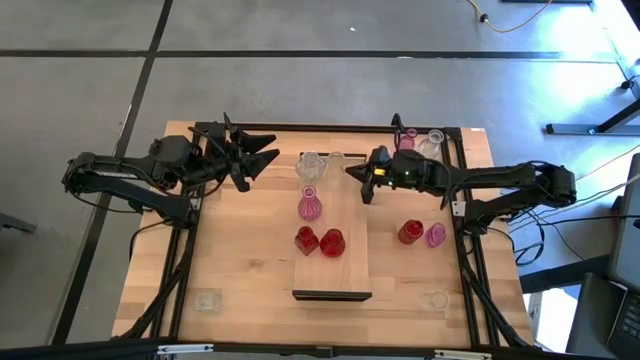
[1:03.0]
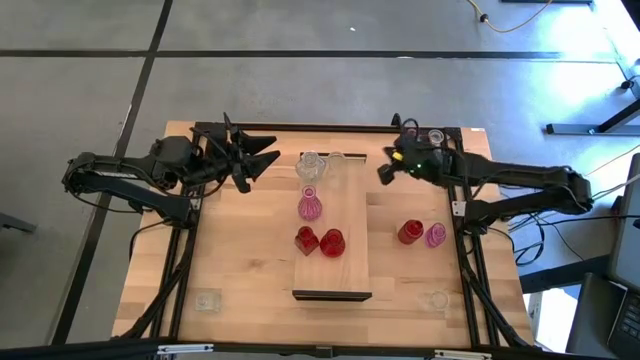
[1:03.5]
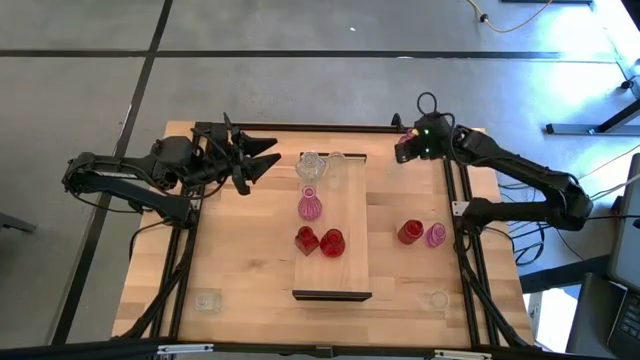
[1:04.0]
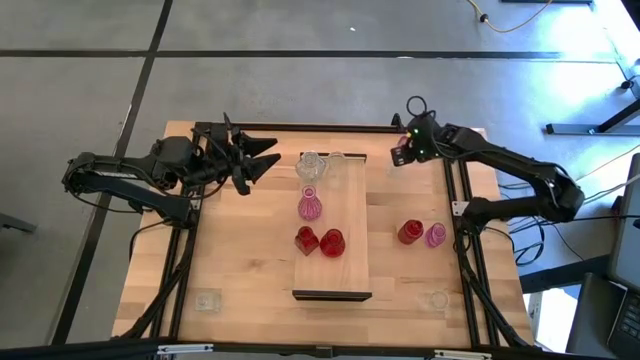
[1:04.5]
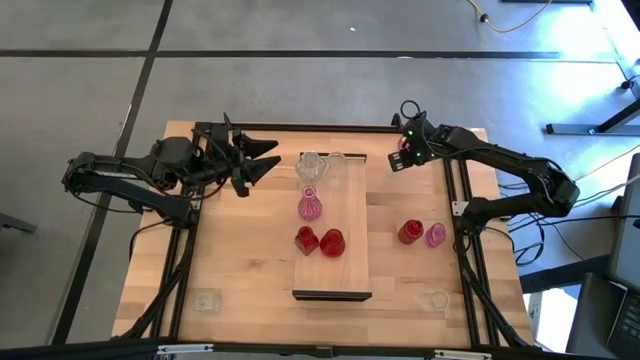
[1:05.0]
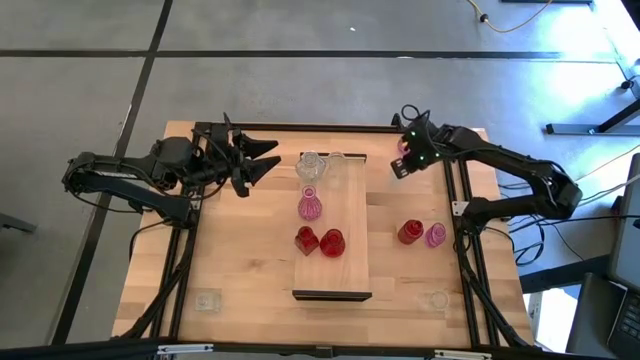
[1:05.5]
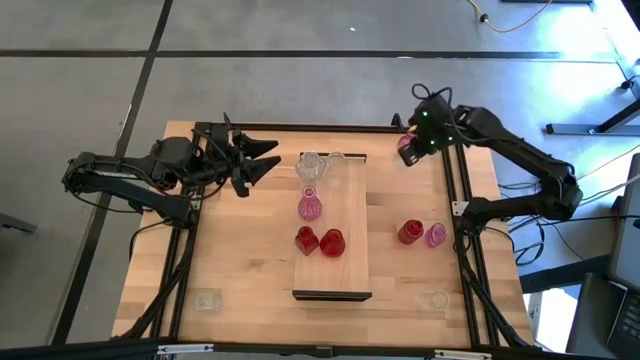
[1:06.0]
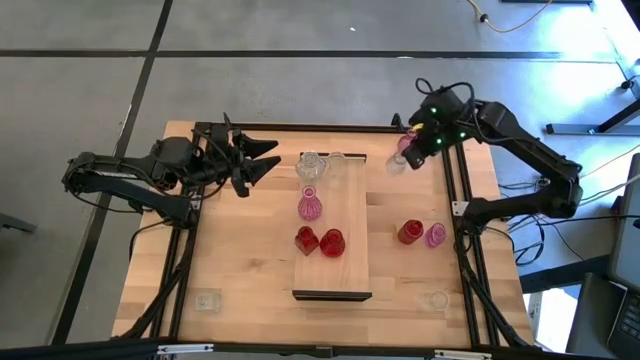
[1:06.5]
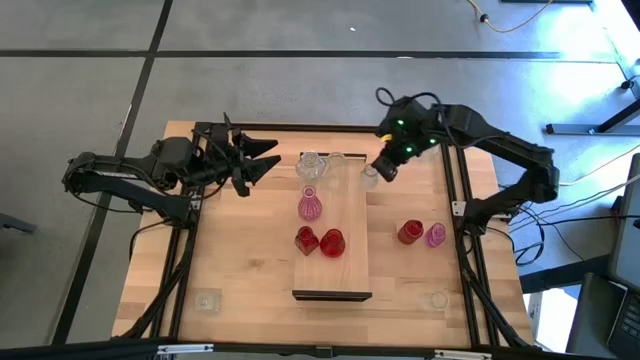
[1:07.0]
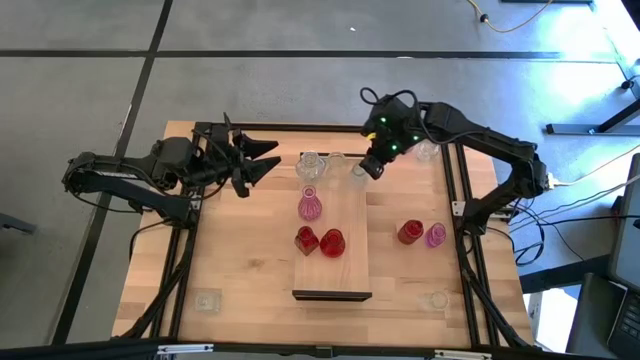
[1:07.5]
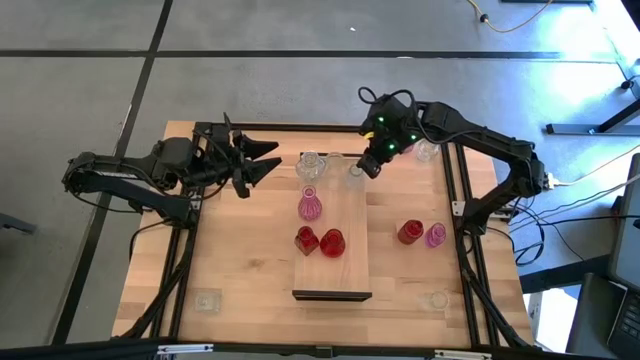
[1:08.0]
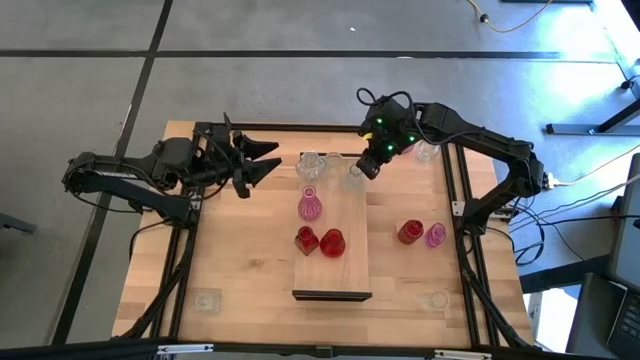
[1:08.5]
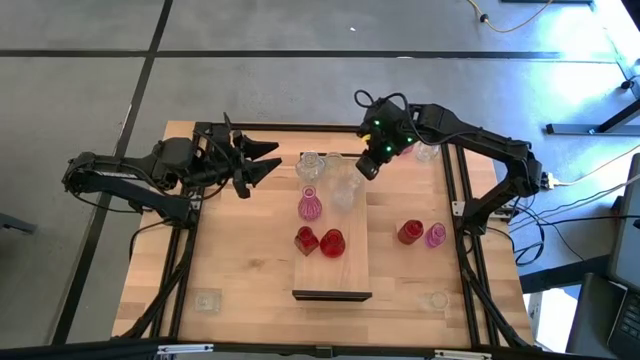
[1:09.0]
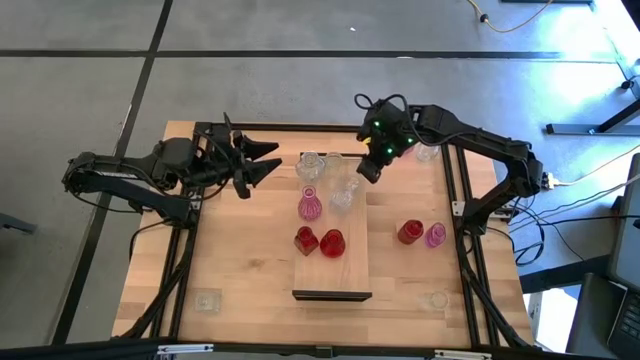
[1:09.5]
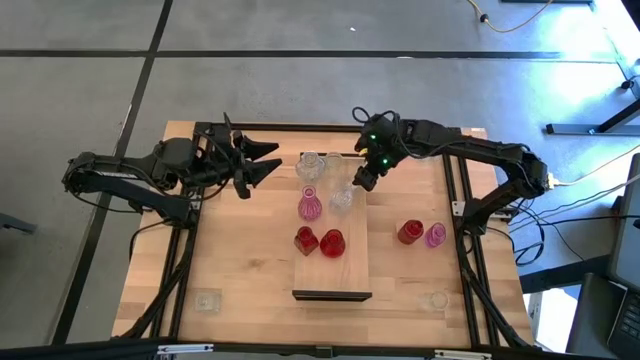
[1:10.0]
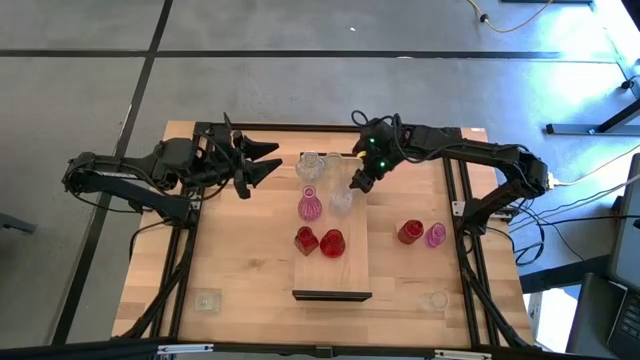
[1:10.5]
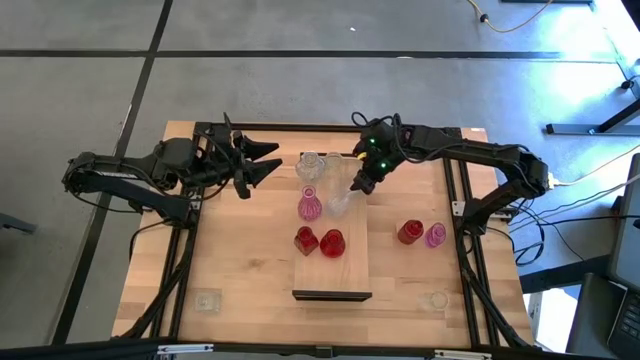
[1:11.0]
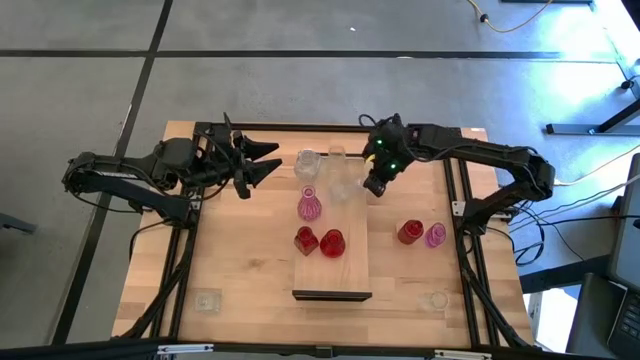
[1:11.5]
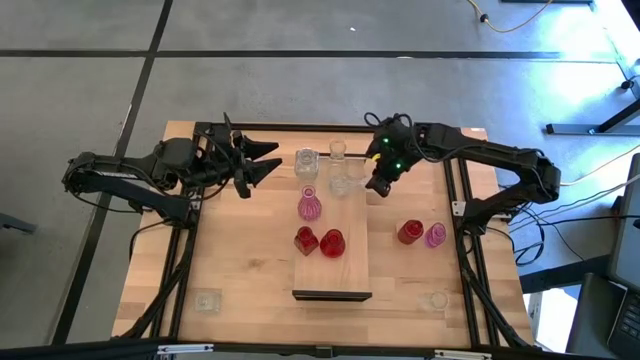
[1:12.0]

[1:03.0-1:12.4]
Task: sort vases onto shelf
Put the transparent vase on the shelf aligned with the other transparent vases

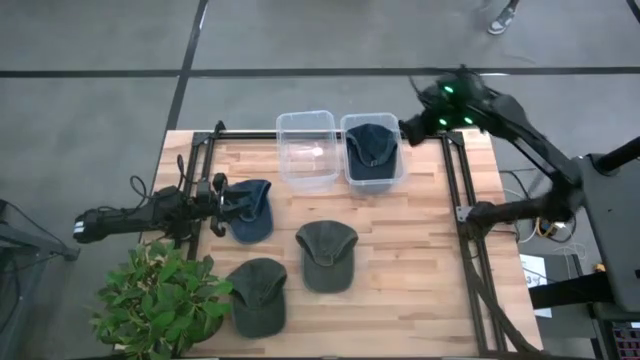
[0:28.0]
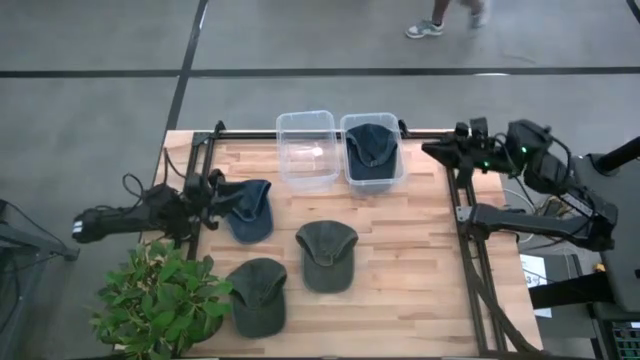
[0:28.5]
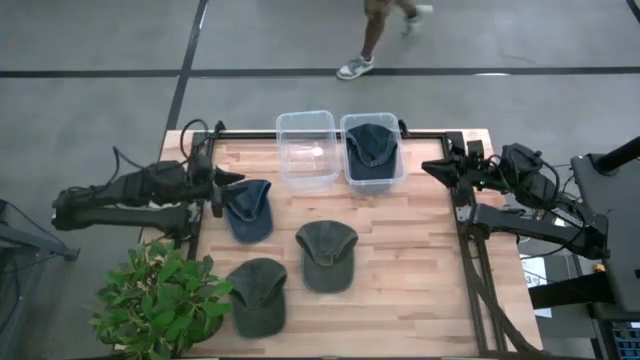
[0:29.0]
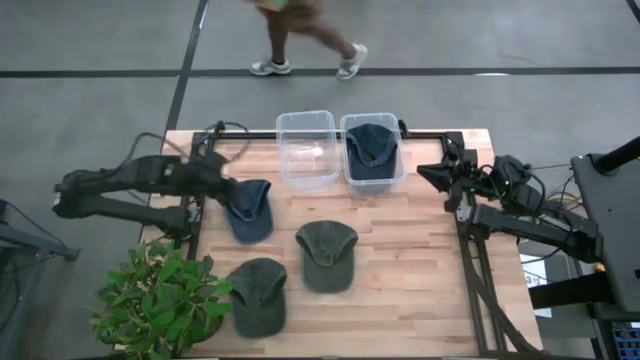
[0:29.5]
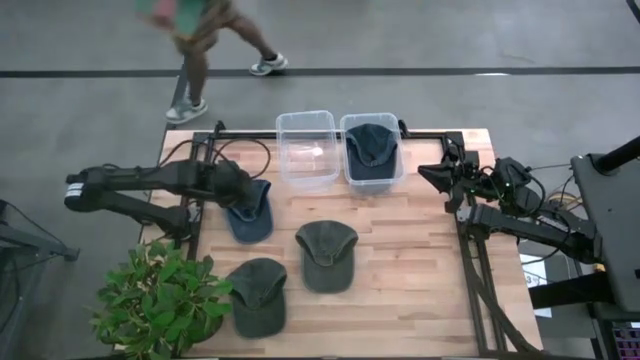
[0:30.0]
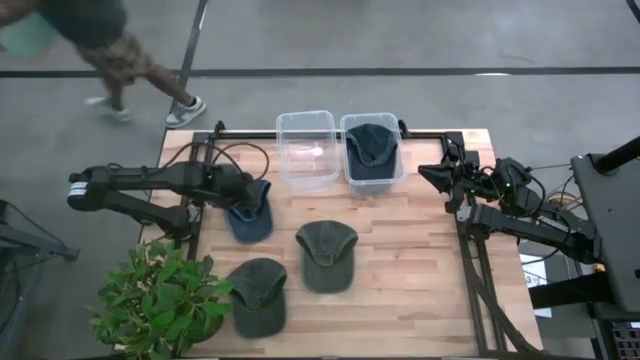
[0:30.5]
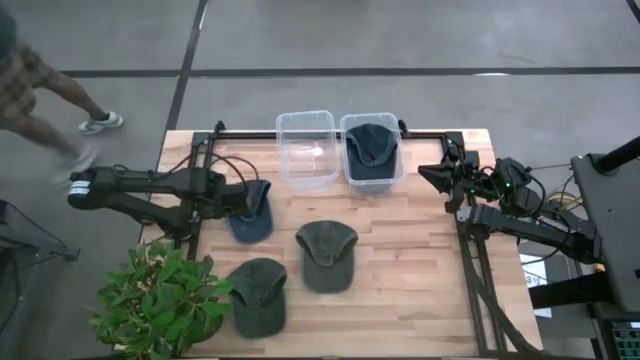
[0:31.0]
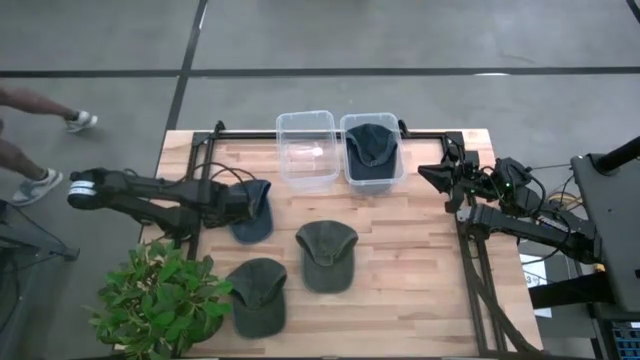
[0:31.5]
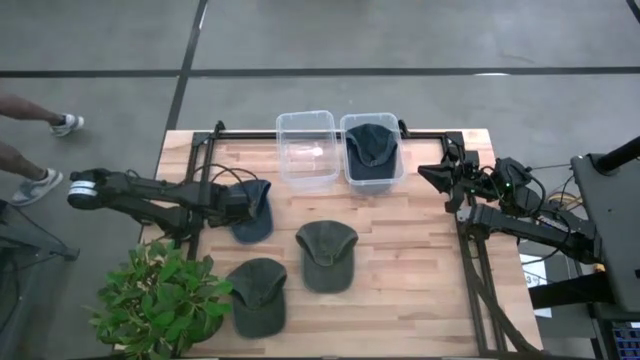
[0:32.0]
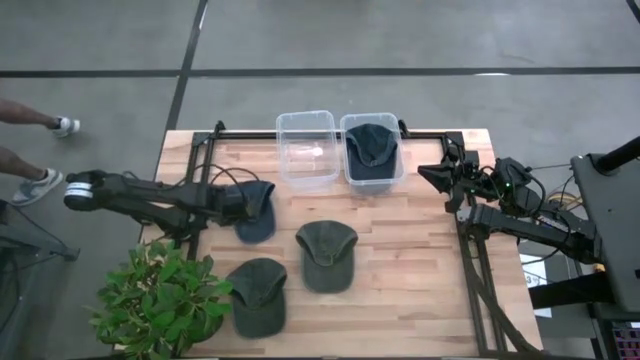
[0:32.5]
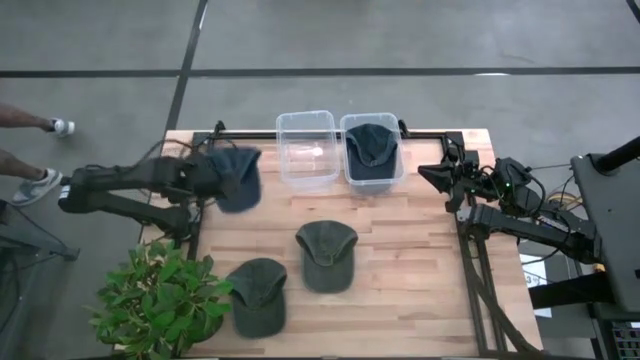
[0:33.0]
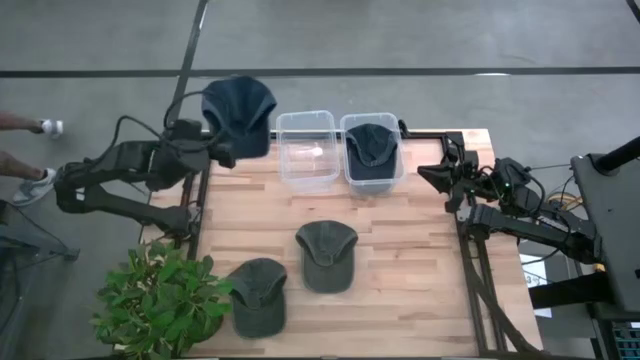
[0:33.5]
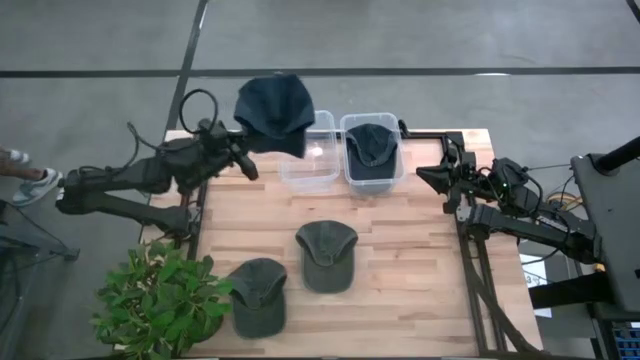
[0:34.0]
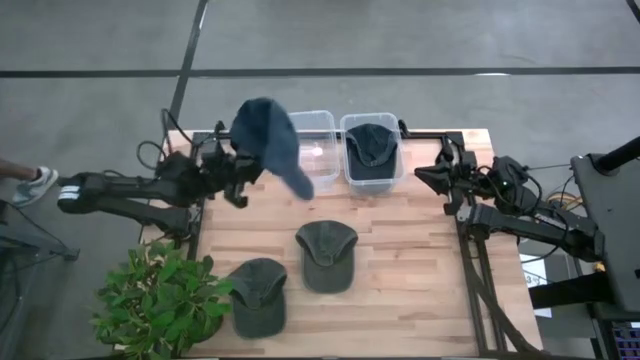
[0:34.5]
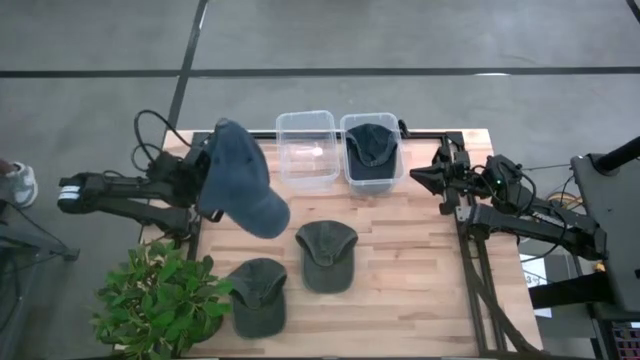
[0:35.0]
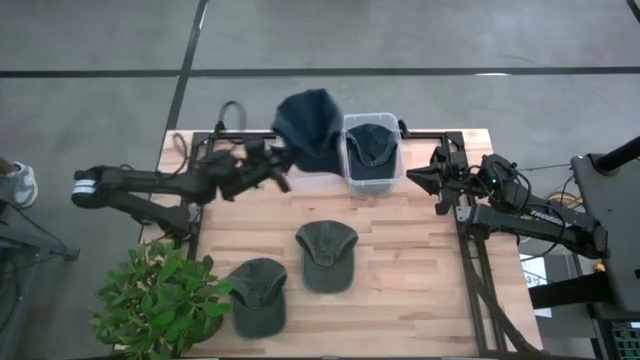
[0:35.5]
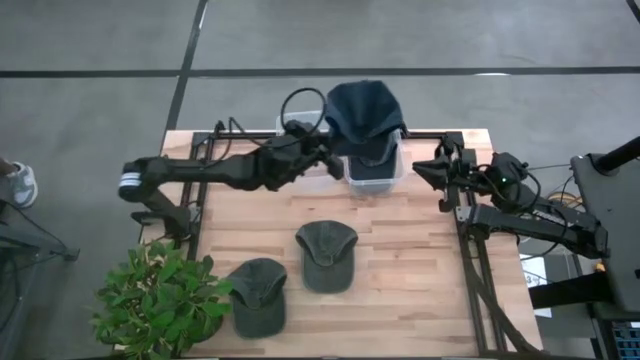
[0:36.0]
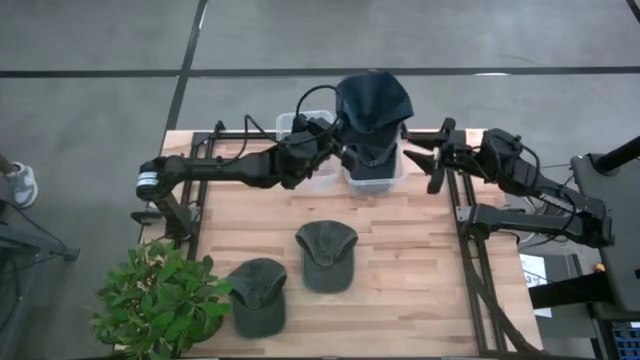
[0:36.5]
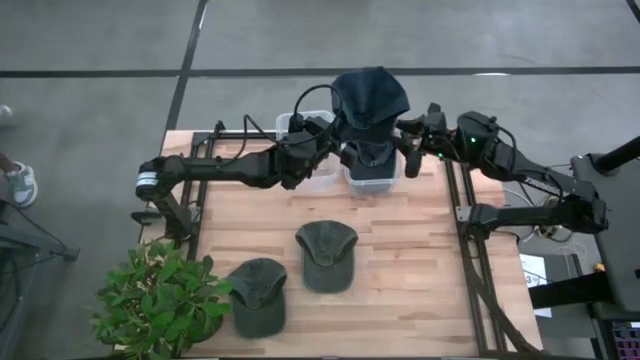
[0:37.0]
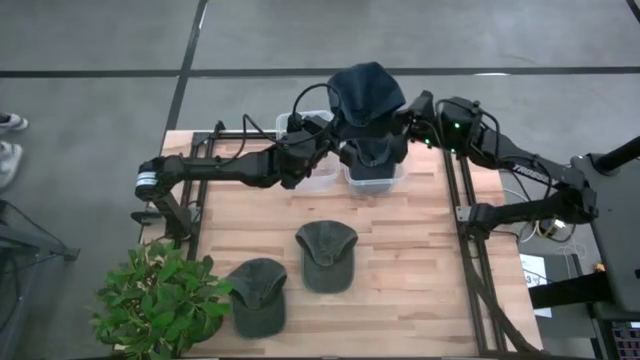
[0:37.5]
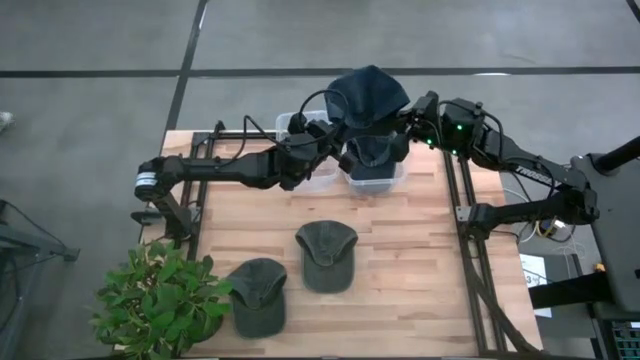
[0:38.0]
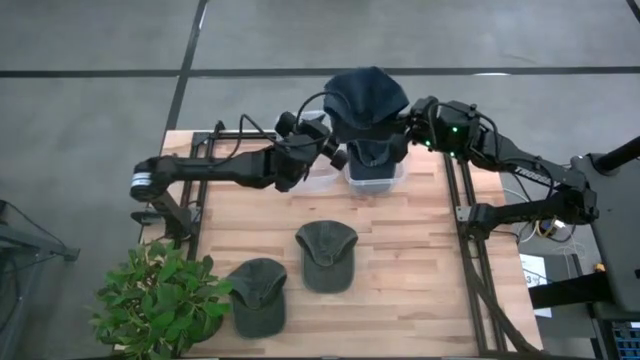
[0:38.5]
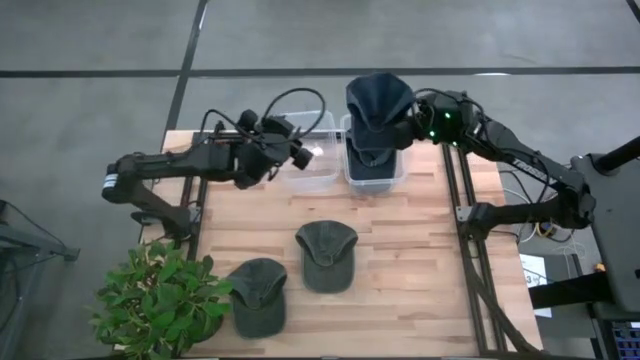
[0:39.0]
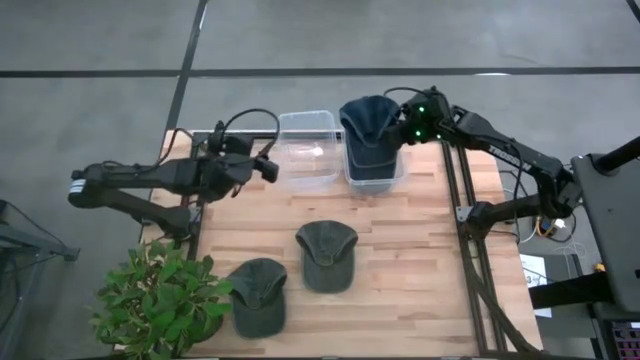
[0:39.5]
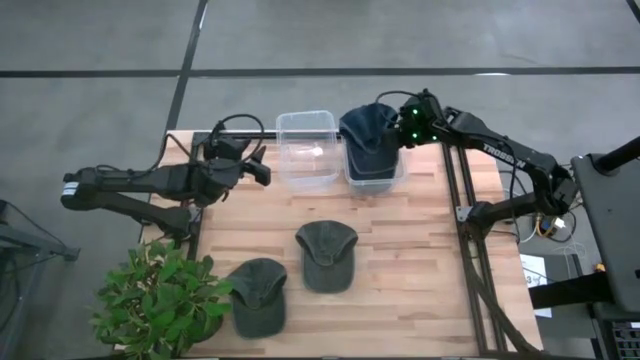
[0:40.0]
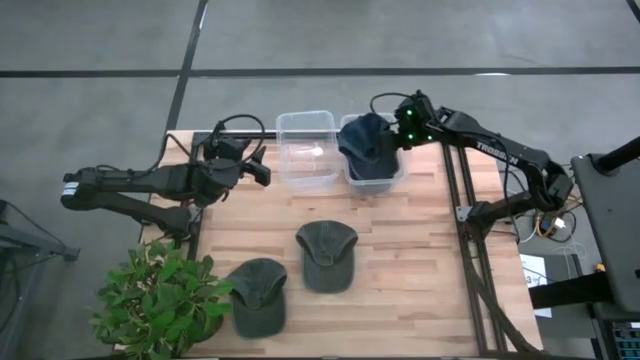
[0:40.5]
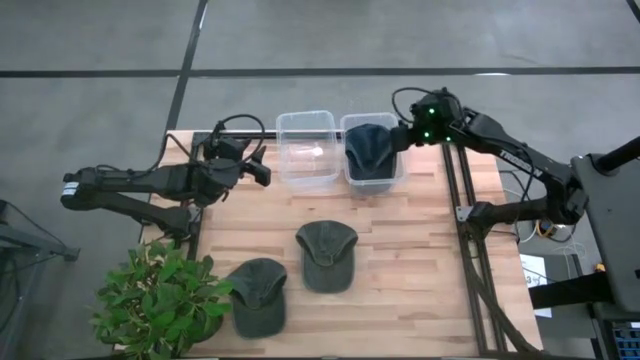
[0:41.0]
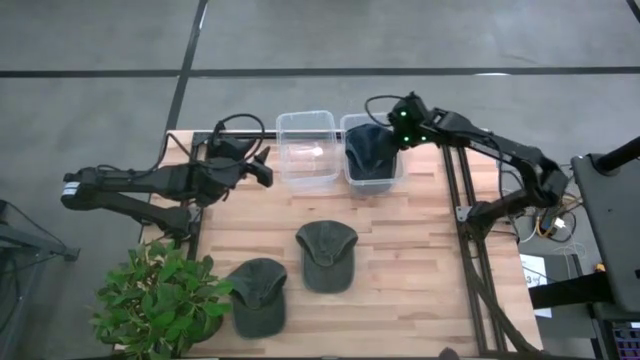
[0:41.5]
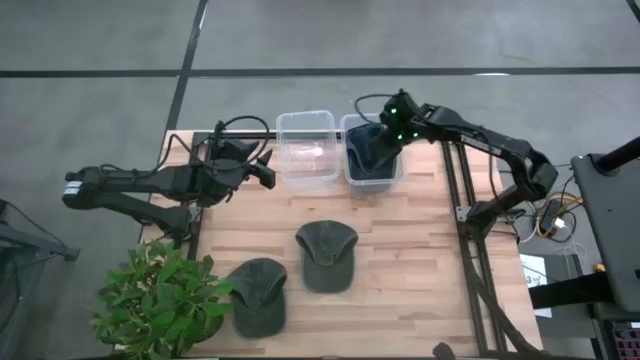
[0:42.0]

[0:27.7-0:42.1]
Task: Pick & Place hat
Put the blue cap into the right transparent bin
